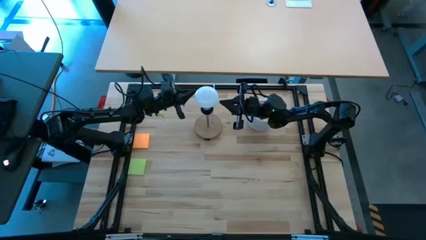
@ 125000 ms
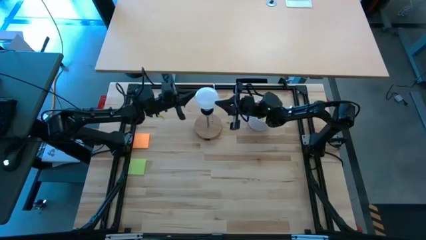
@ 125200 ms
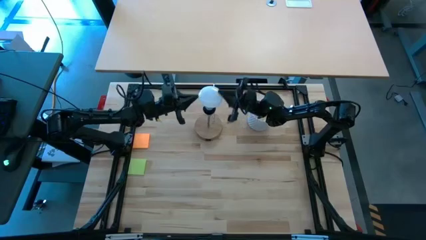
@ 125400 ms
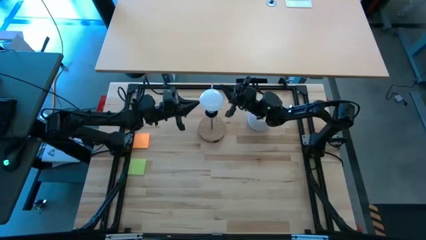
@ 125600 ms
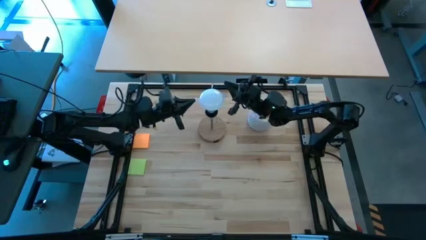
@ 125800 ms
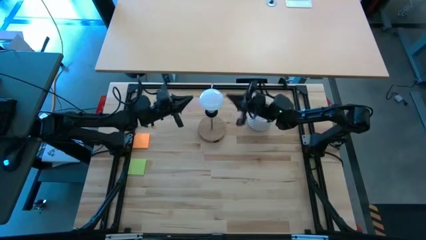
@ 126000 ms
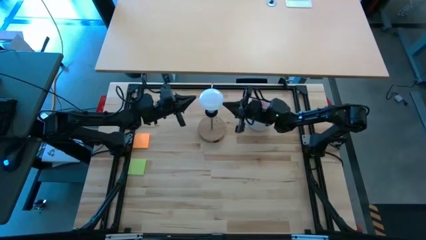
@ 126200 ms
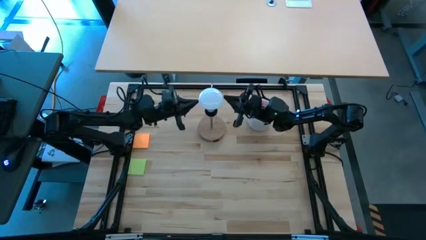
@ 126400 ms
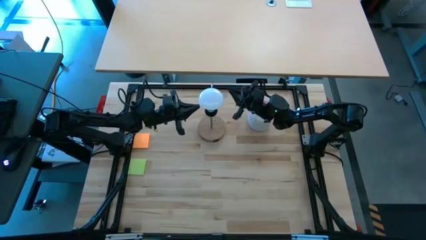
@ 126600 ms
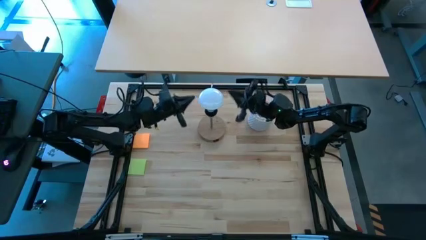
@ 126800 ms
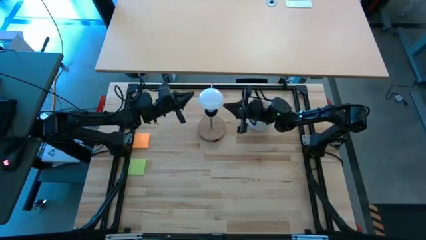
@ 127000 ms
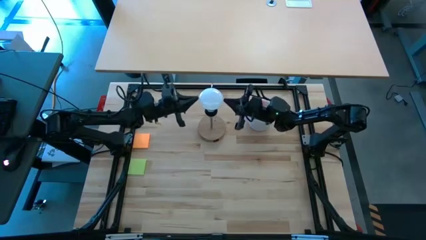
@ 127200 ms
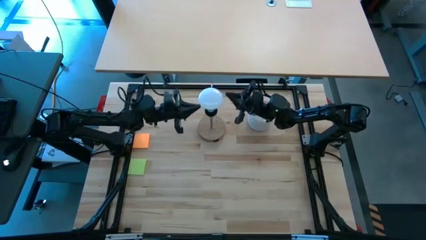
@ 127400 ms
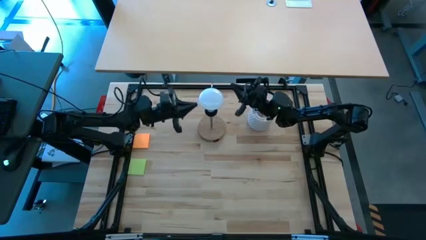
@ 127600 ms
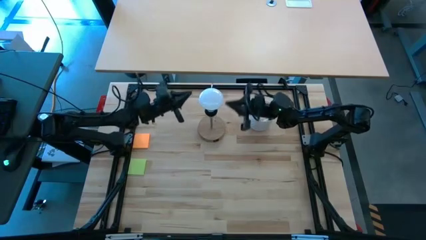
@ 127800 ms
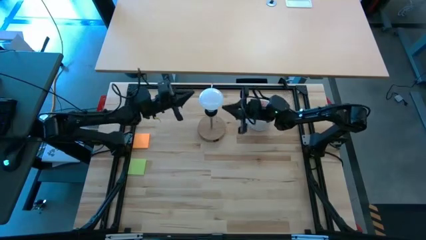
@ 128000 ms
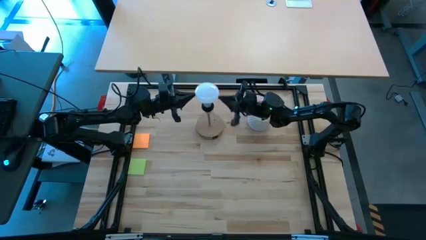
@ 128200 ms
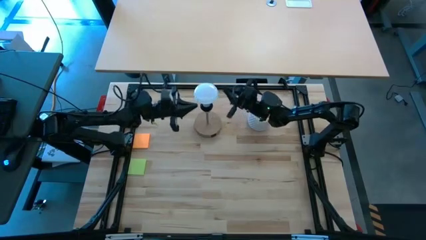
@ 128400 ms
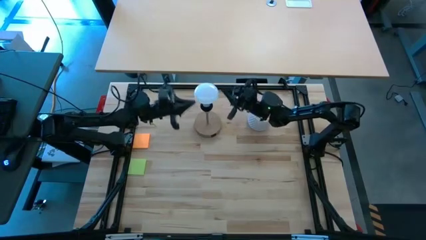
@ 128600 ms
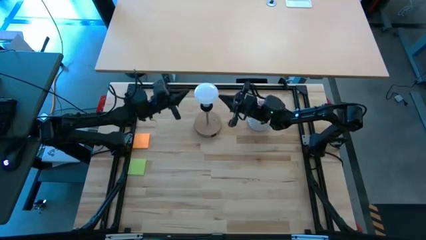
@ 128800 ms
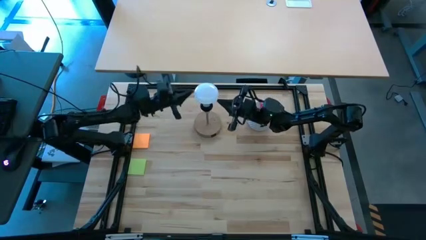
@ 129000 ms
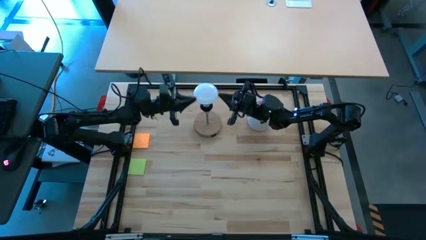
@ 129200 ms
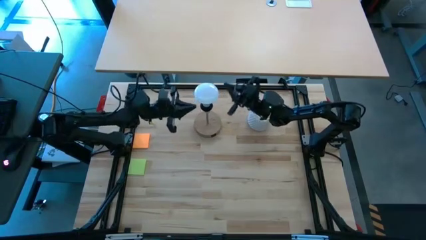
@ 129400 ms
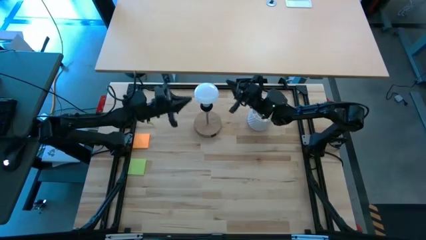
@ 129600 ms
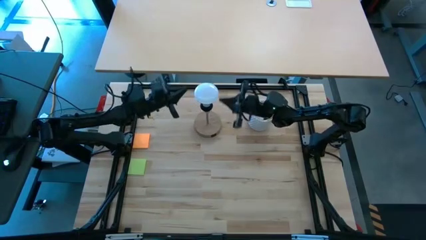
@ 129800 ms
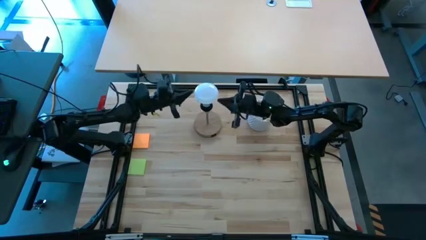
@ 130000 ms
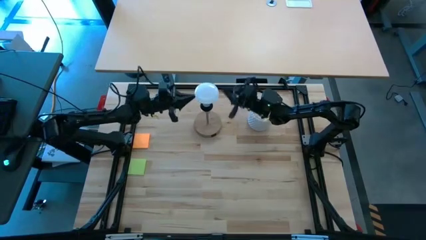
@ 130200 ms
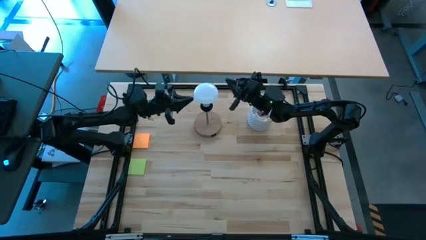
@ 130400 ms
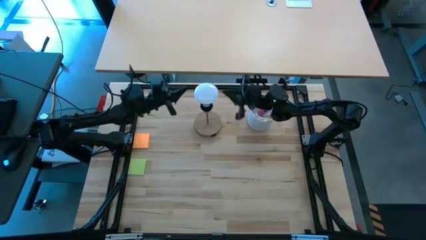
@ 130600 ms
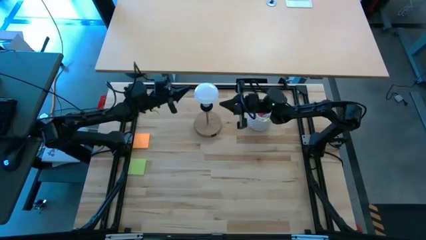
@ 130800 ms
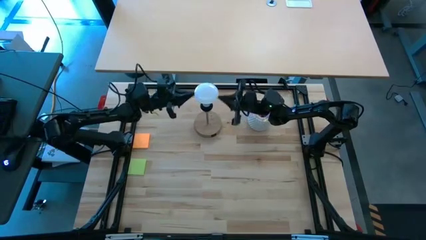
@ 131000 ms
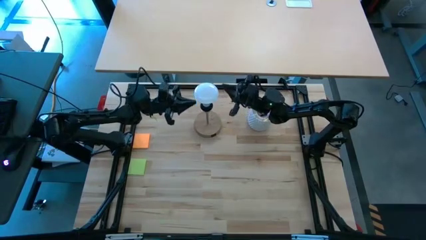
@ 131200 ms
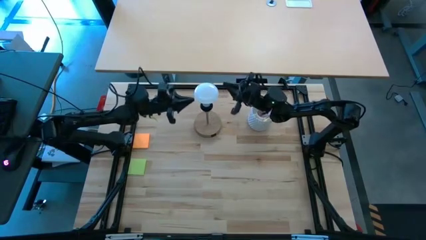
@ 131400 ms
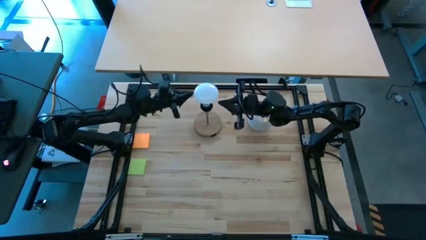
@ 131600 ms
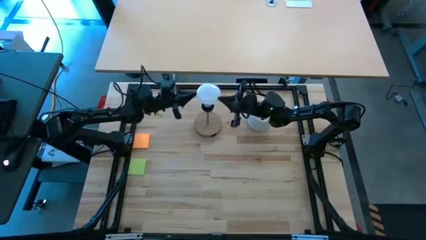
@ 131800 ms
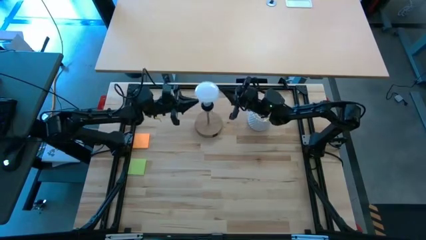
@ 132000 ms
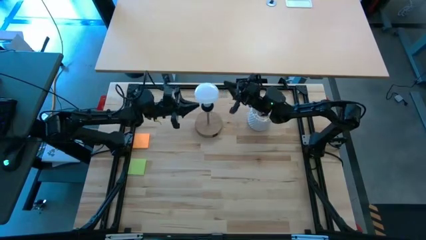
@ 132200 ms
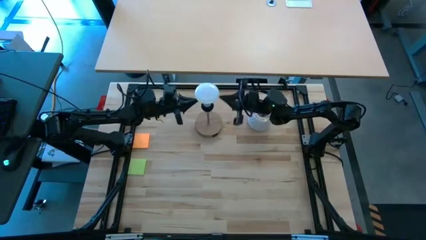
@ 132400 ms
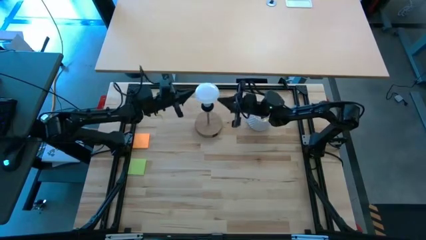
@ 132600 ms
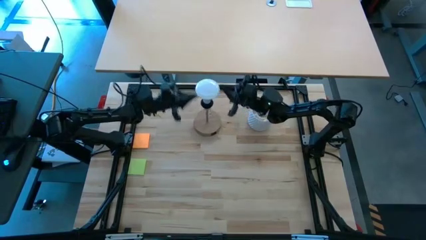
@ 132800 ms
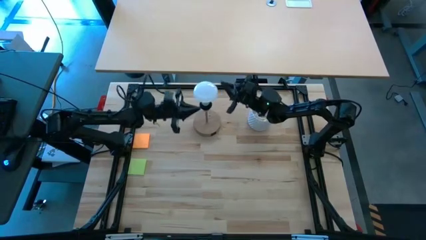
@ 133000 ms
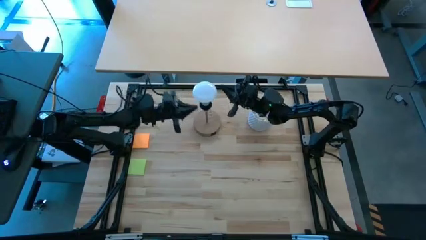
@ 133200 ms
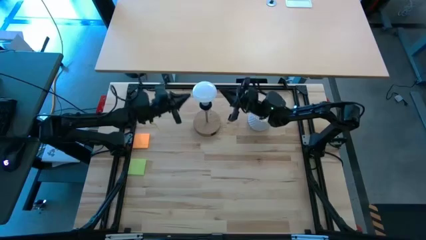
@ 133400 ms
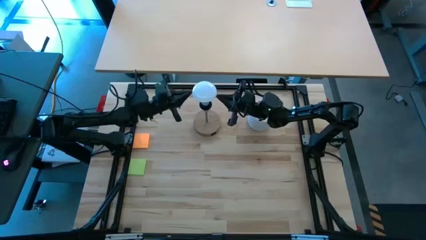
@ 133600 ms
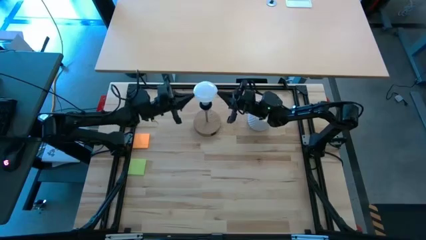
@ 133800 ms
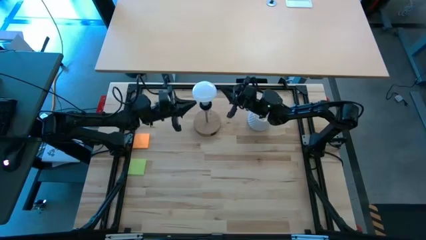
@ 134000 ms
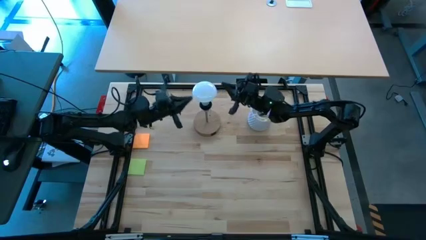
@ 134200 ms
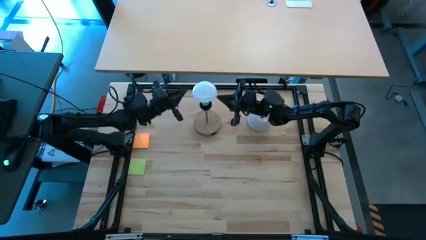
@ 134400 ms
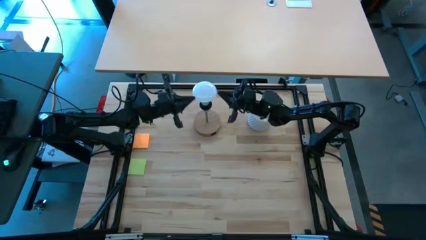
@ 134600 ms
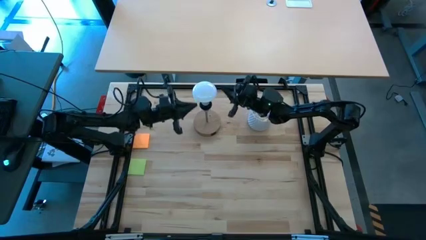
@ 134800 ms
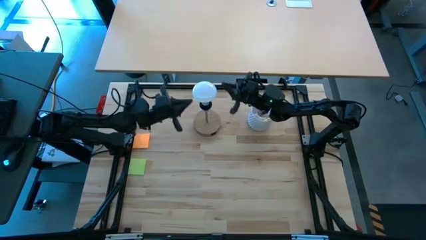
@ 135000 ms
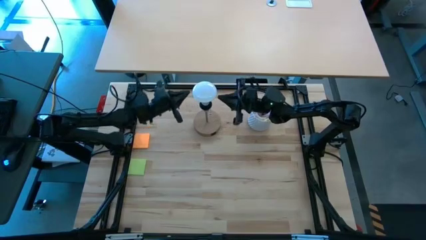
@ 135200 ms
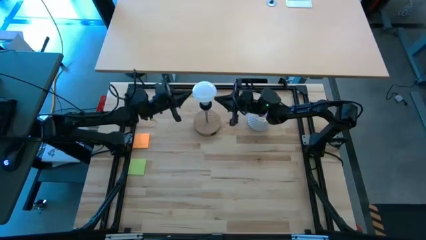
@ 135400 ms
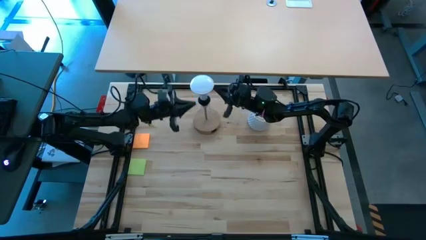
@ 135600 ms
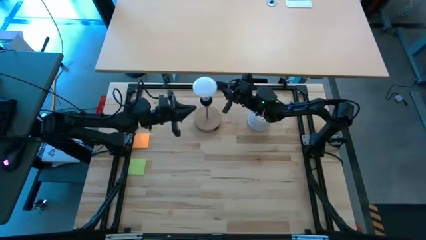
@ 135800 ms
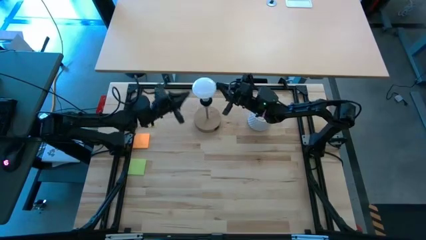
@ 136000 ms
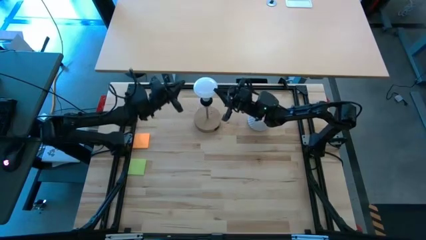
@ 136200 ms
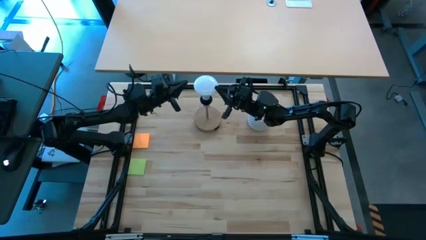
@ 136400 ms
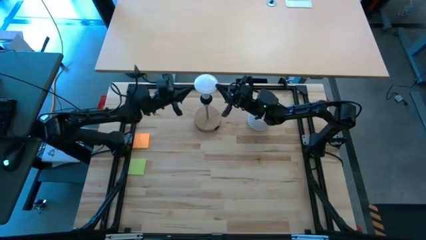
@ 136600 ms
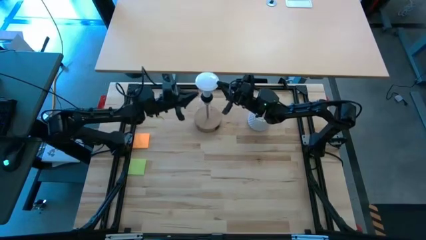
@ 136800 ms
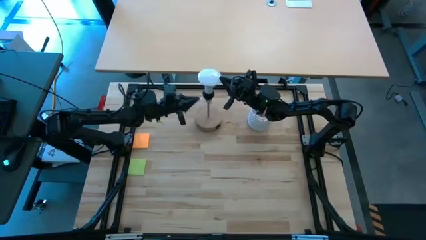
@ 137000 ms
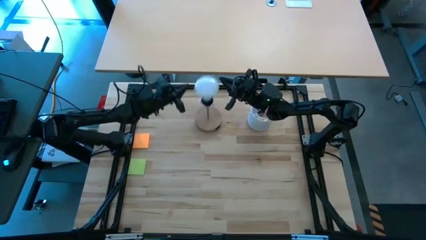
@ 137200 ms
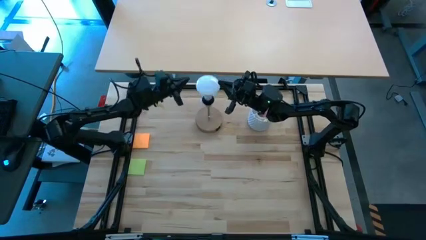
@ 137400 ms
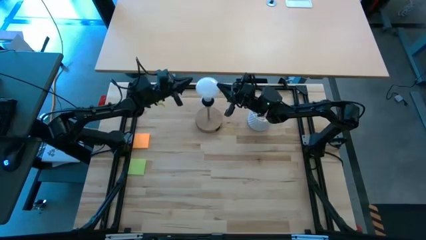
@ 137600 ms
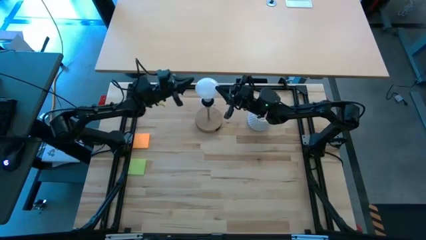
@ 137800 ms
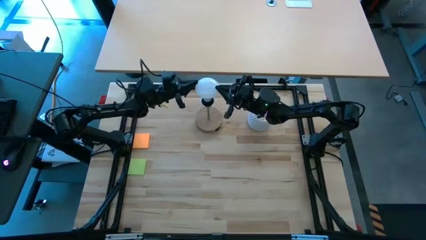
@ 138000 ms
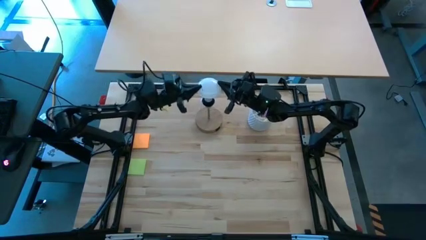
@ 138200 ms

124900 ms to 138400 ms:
Task: Screw lightbulb
Remove the lightbulb from the brown lamp
